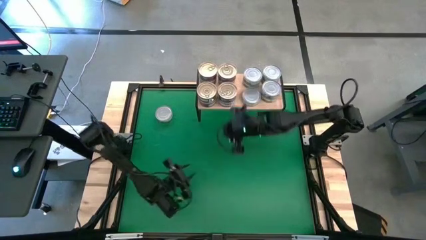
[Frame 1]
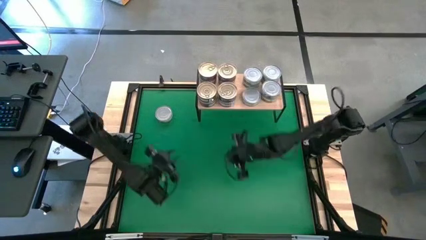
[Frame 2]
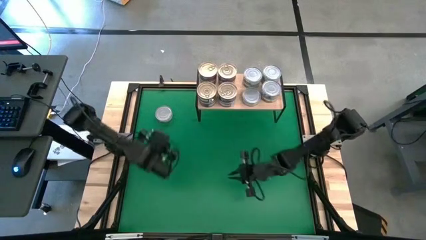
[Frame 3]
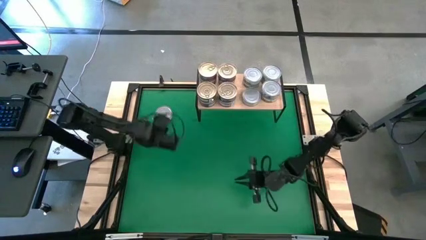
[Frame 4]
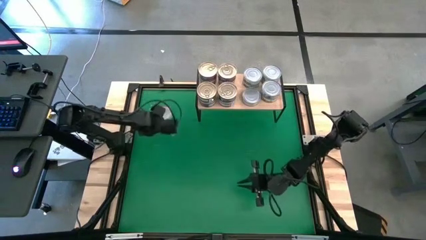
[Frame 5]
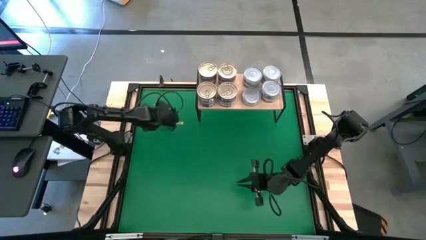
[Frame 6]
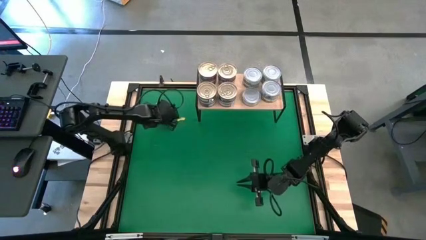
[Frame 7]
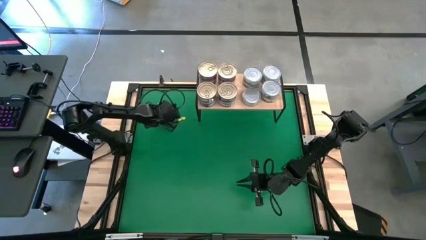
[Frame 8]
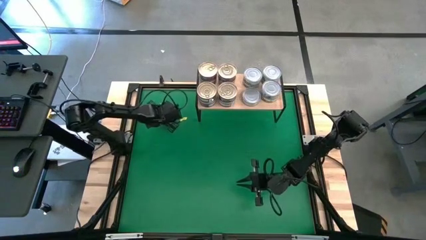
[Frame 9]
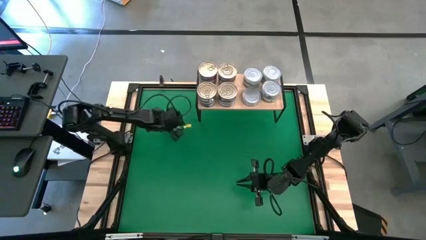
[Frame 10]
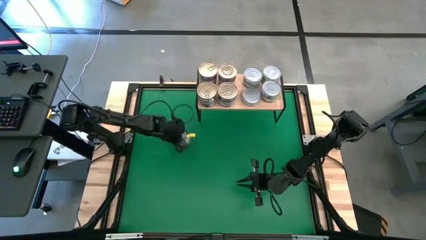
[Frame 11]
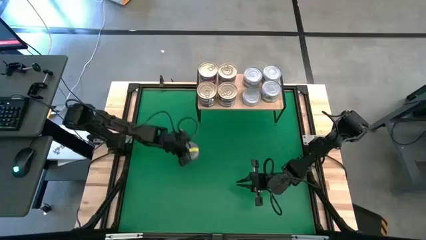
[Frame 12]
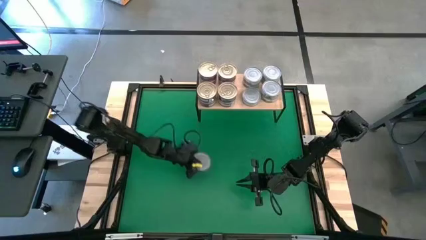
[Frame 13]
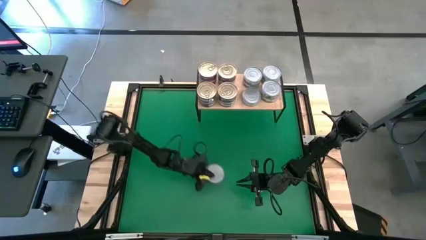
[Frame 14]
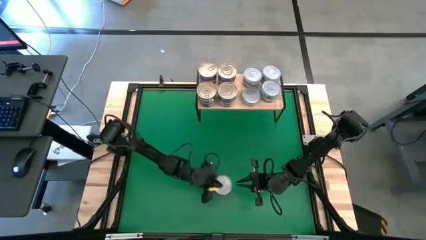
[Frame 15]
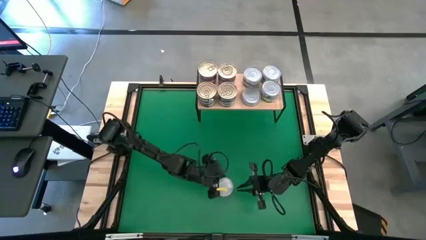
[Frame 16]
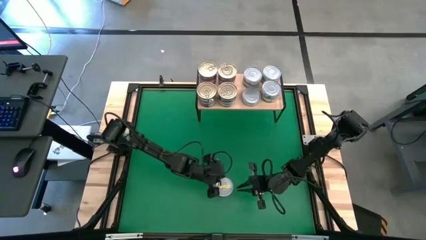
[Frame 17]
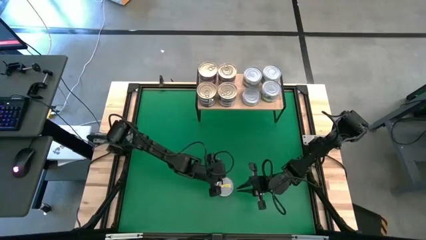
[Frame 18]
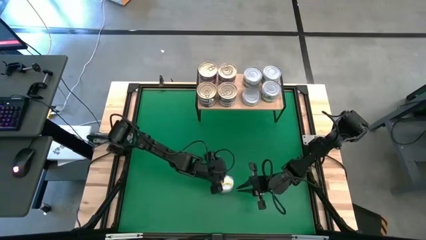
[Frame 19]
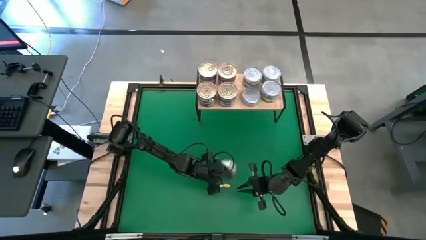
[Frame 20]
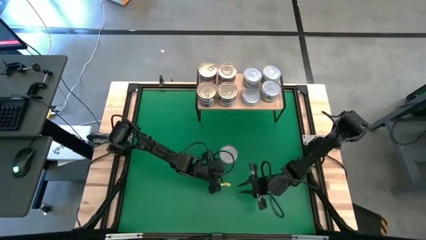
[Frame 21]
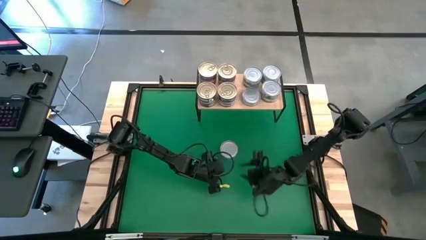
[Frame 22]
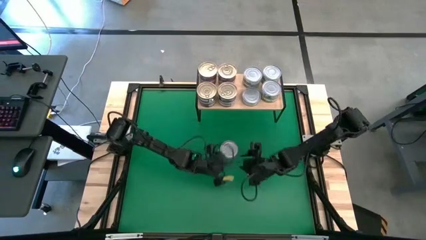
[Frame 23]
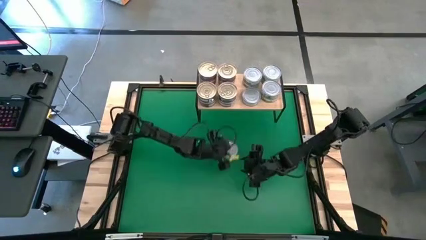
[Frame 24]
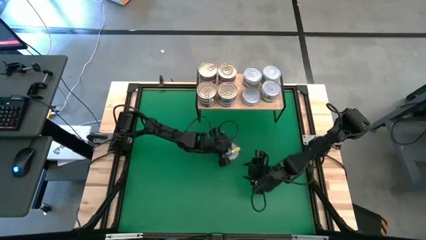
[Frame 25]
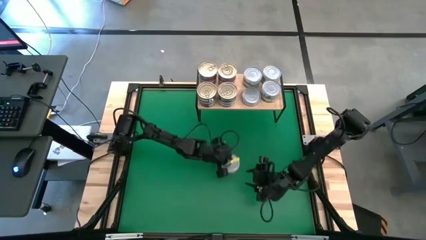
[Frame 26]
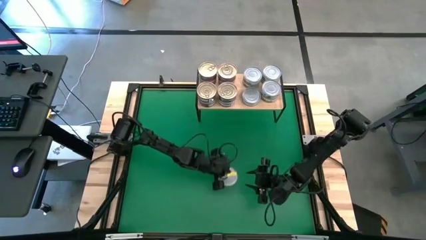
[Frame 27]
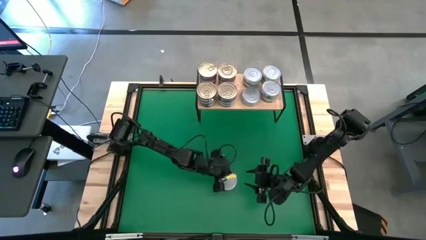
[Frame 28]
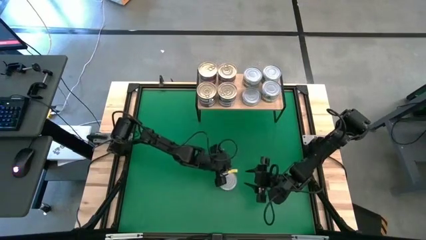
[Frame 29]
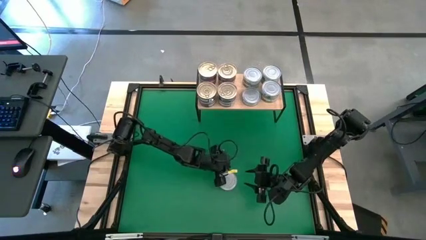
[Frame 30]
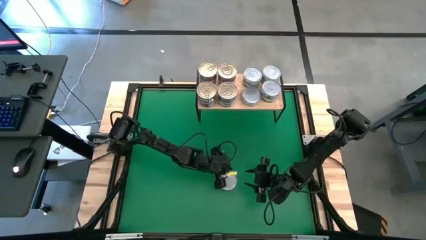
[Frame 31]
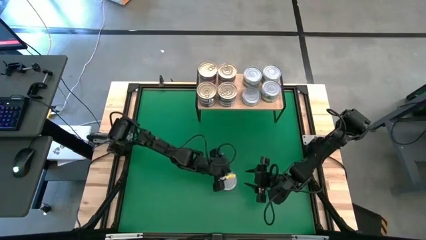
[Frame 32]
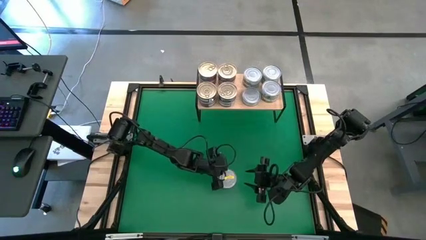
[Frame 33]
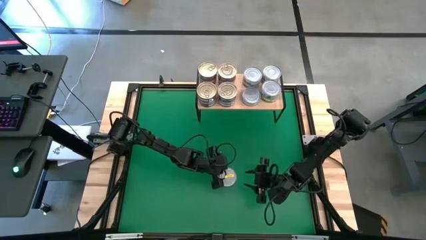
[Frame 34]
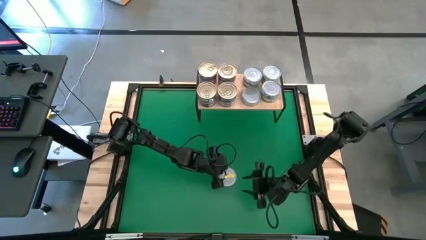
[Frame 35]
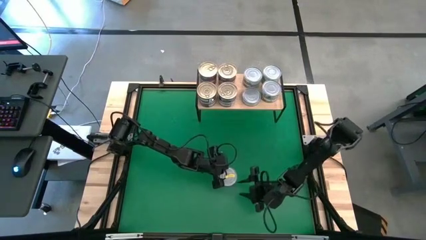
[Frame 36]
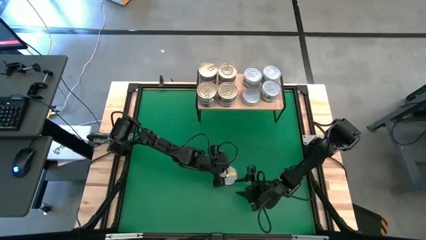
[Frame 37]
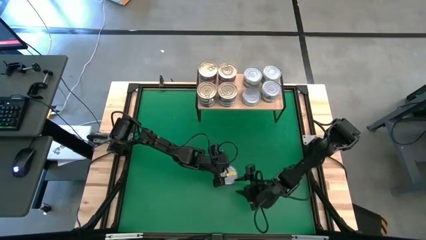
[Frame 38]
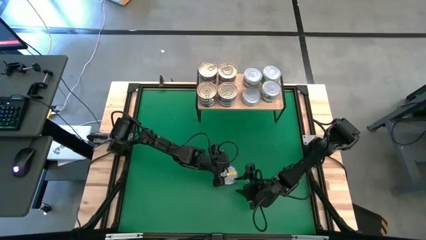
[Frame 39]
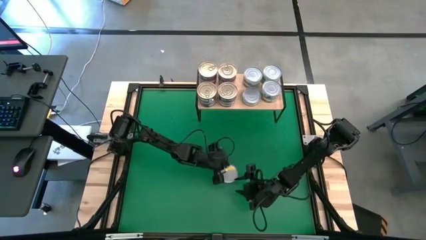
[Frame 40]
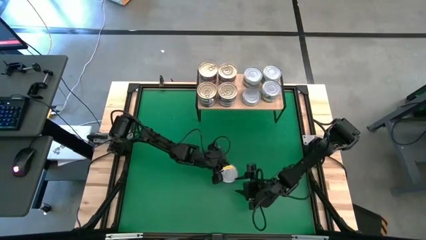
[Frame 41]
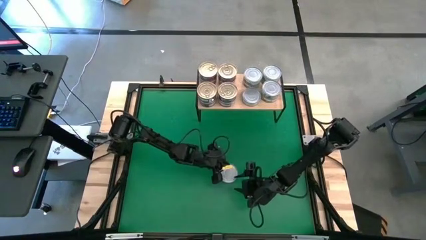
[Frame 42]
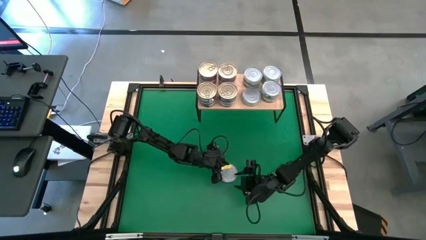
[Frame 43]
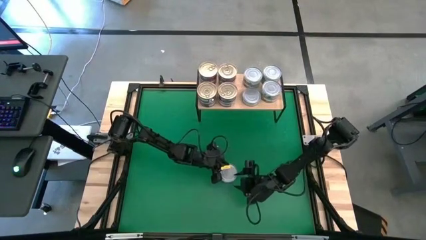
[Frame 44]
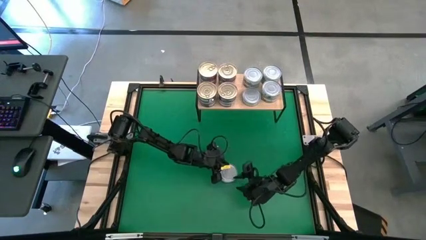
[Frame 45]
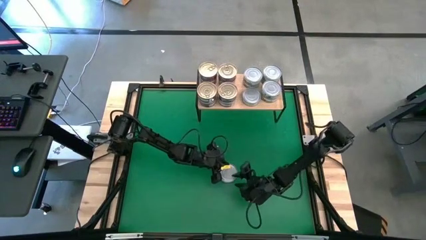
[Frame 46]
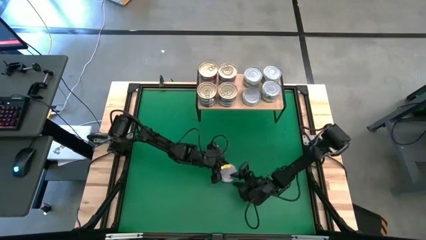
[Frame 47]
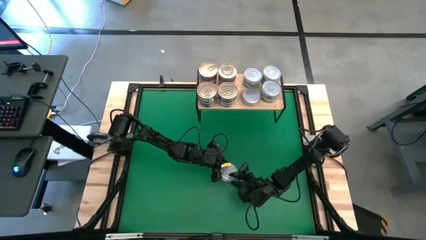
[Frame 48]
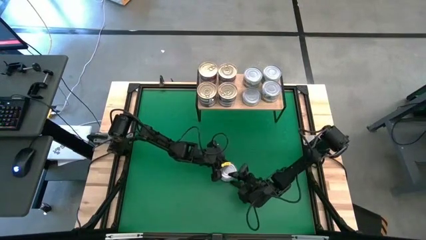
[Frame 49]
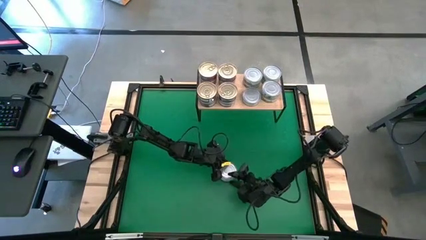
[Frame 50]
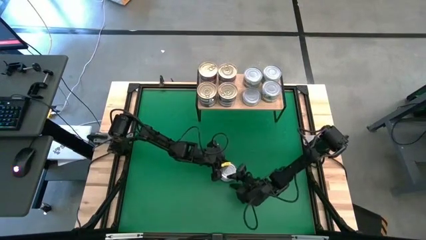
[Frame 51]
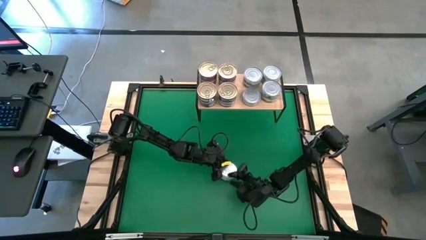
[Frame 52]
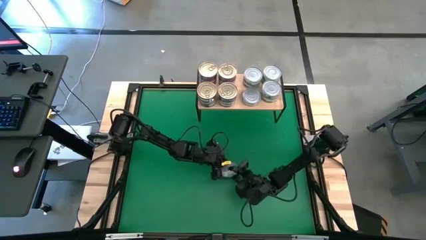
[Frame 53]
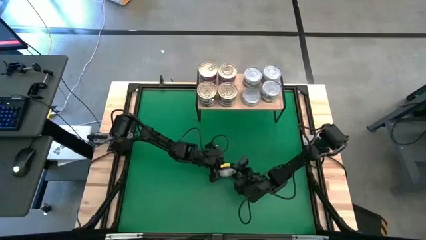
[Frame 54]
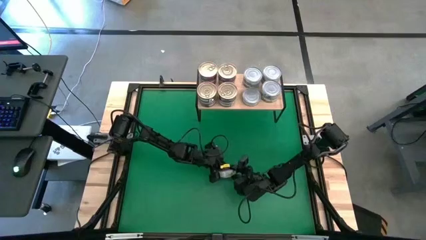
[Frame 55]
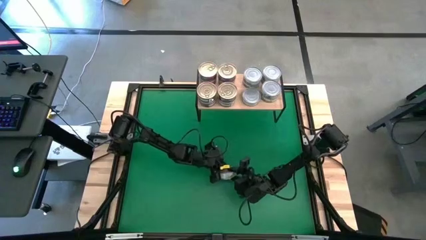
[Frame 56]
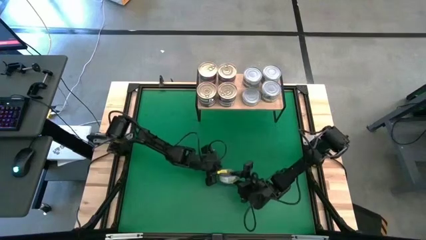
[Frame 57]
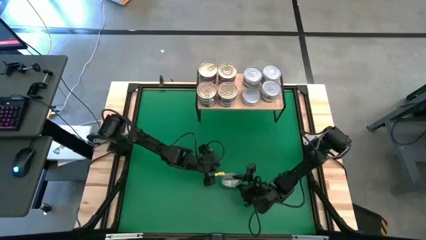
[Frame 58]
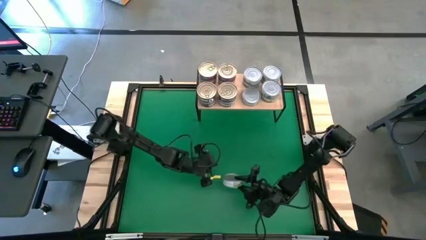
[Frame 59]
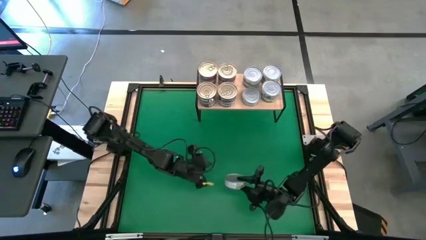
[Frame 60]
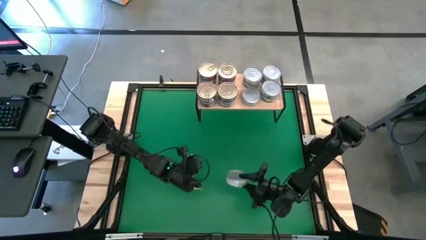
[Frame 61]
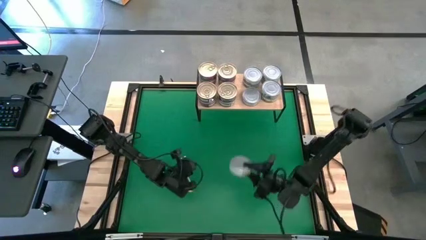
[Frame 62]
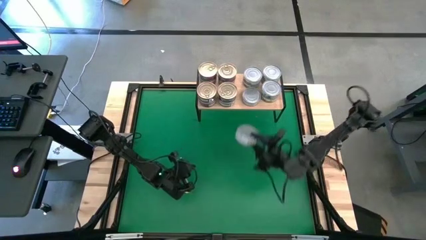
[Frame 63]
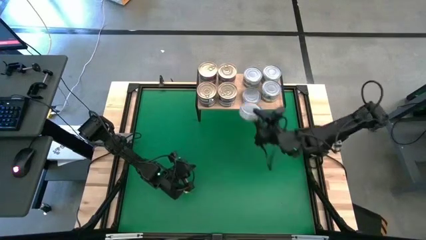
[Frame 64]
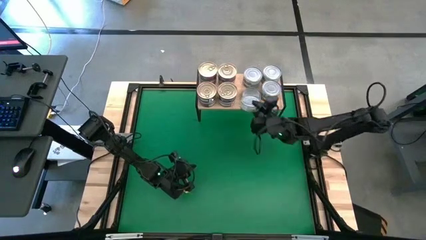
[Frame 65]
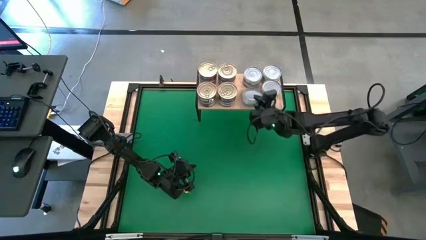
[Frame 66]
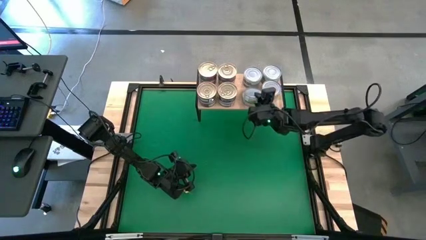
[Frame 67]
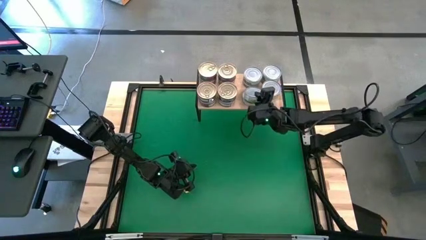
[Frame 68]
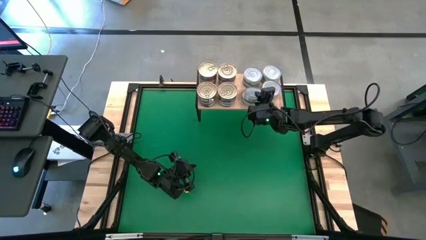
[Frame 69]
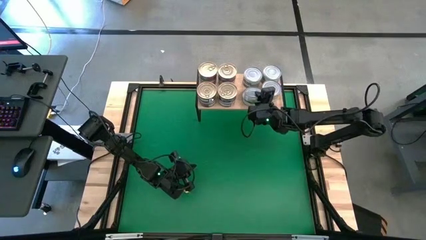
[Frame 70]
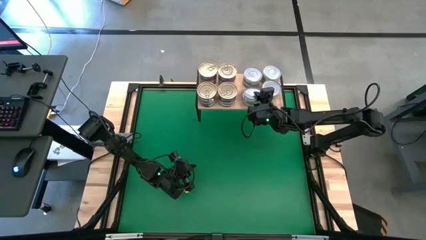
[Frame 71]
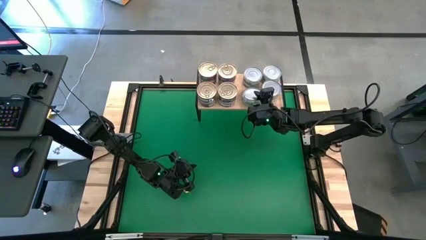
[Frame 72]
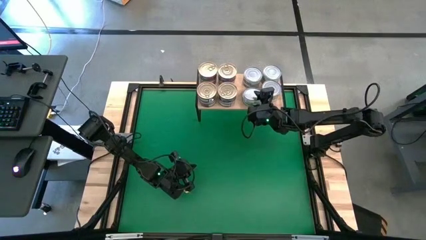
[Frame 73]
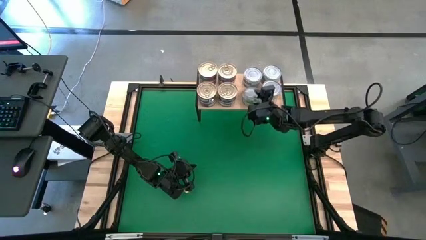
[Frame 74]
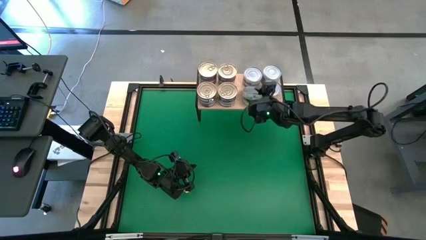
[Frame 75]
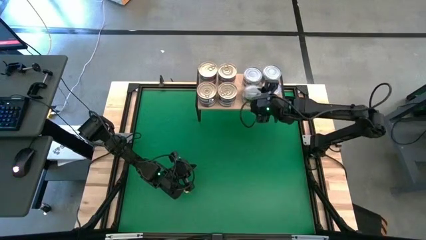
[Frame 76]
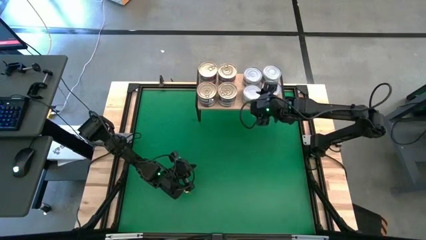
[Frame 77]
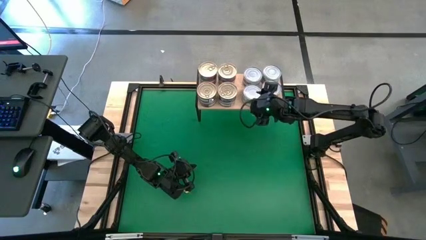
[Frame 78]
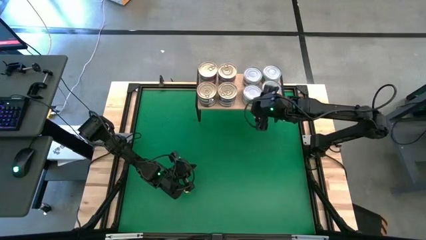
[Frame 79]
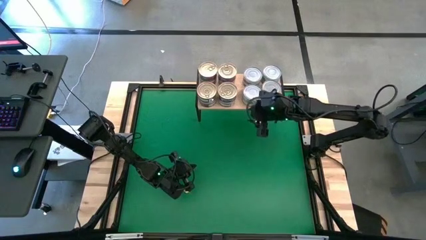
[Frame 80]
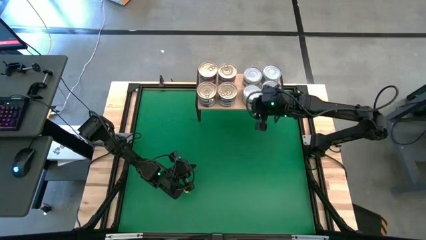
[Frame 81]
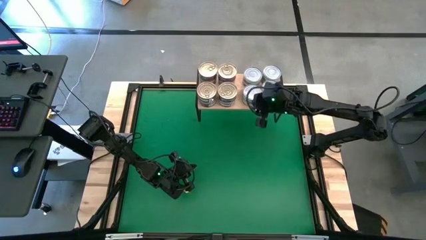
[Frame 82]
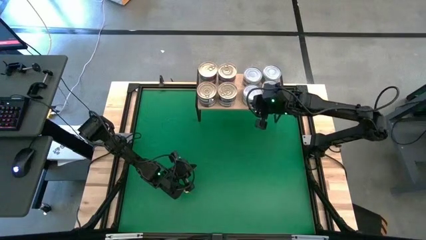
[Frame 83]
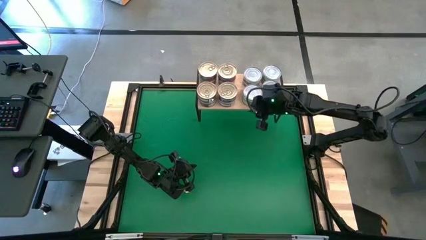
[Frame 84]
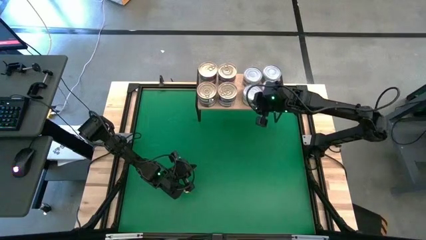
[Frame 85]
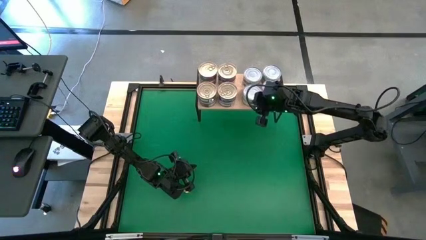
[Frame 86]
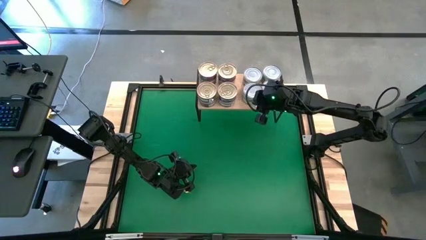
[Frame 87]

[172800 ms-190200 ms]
Task: Stack canned seafood by type on shelf
Stack the green tuna can on top of the bottom left green tuna can on the shelf
